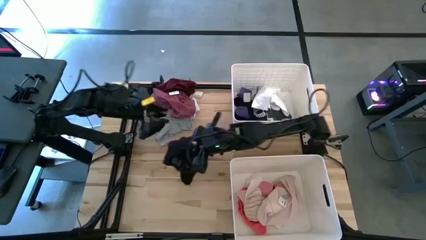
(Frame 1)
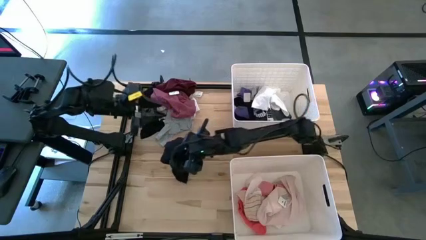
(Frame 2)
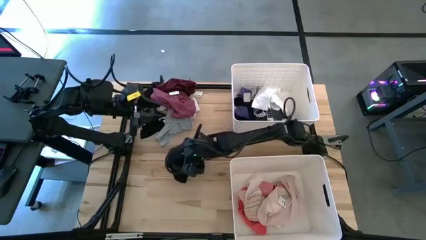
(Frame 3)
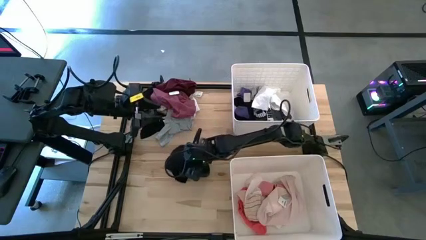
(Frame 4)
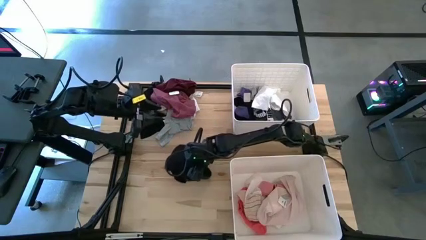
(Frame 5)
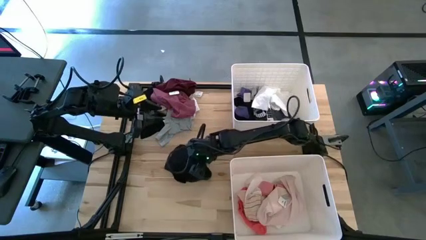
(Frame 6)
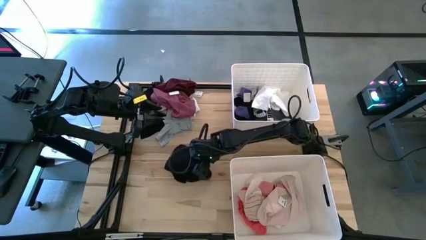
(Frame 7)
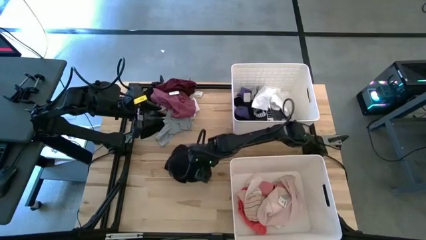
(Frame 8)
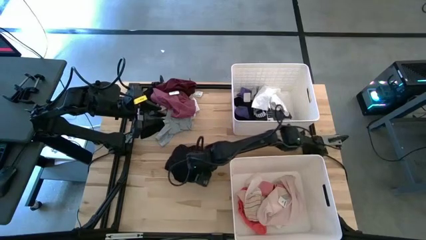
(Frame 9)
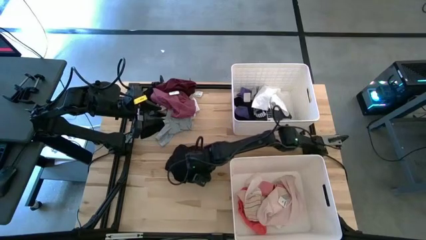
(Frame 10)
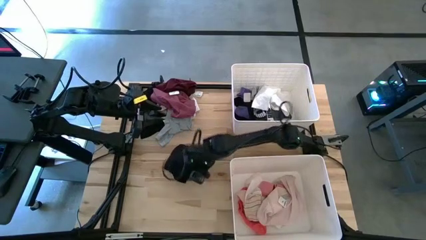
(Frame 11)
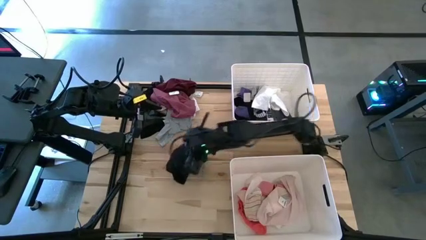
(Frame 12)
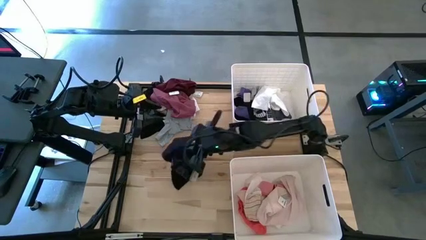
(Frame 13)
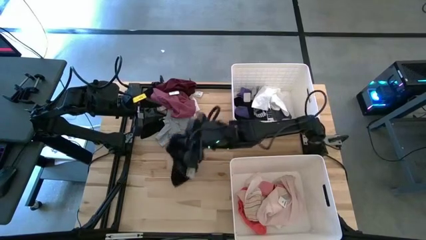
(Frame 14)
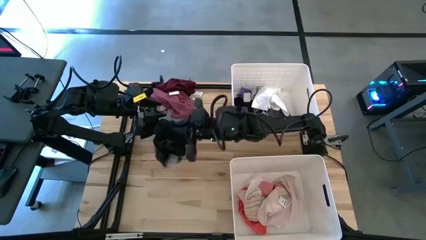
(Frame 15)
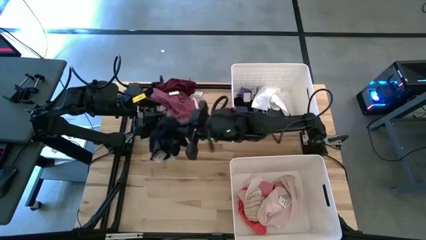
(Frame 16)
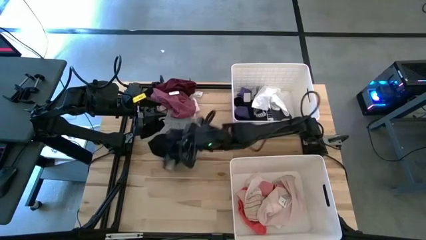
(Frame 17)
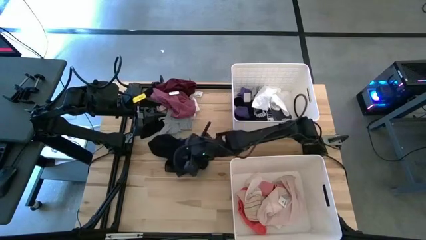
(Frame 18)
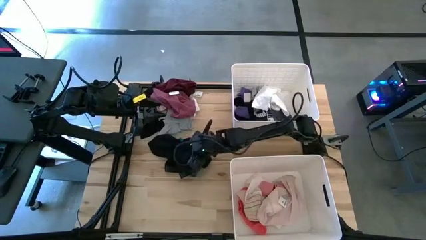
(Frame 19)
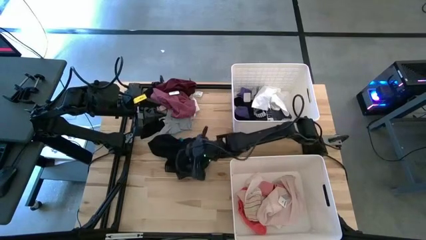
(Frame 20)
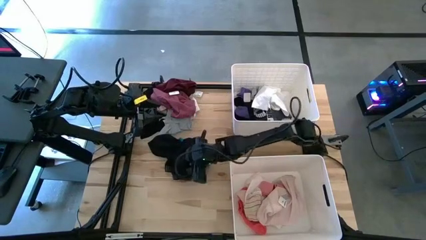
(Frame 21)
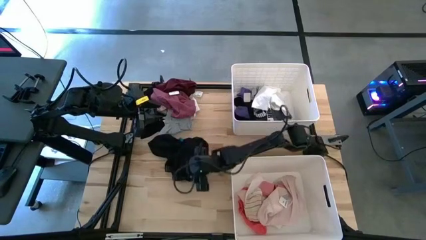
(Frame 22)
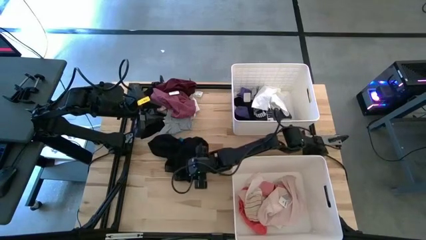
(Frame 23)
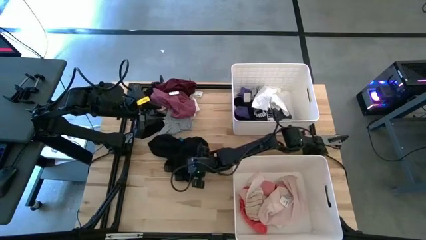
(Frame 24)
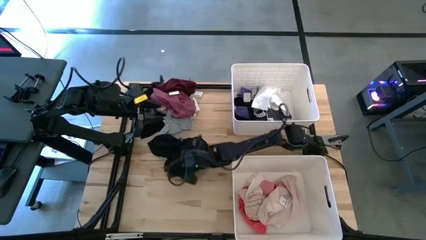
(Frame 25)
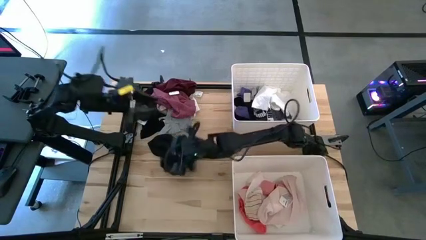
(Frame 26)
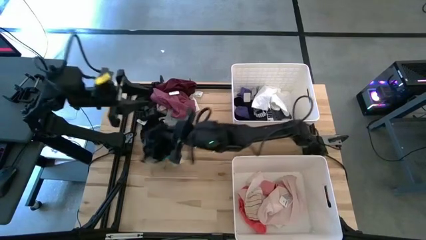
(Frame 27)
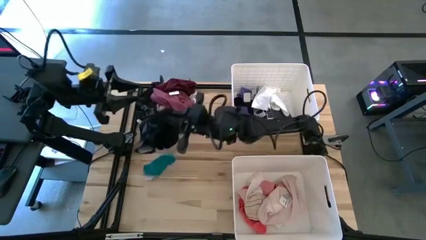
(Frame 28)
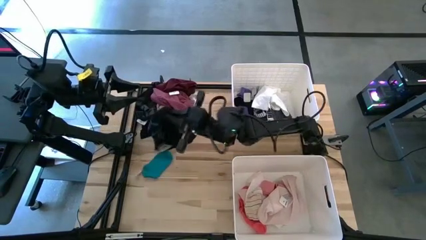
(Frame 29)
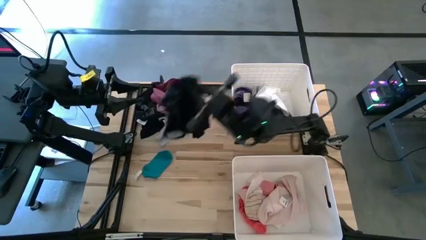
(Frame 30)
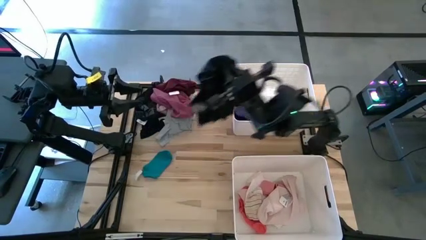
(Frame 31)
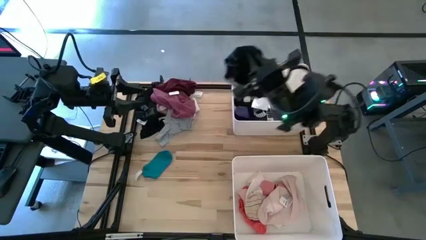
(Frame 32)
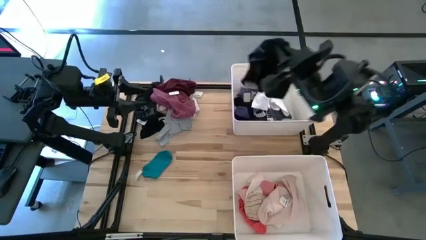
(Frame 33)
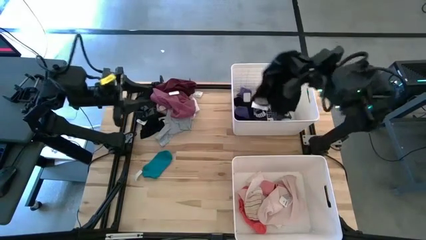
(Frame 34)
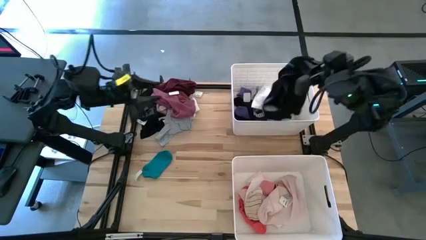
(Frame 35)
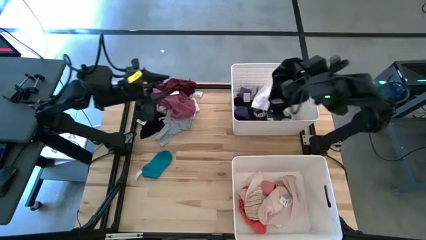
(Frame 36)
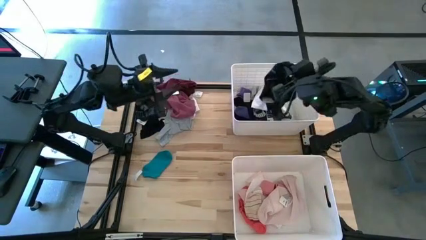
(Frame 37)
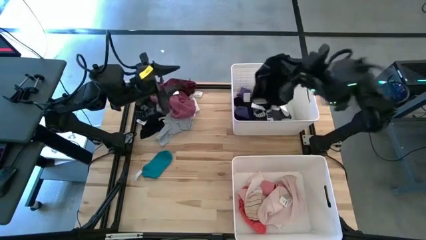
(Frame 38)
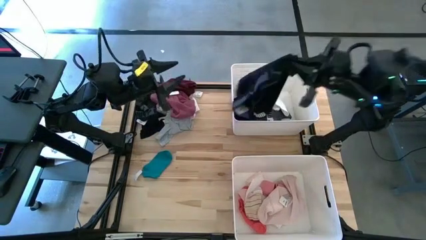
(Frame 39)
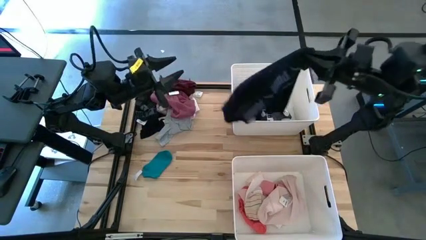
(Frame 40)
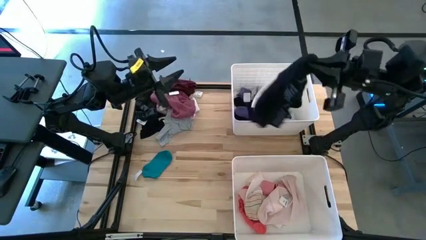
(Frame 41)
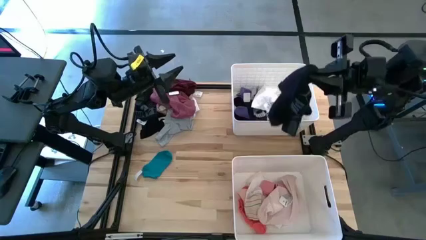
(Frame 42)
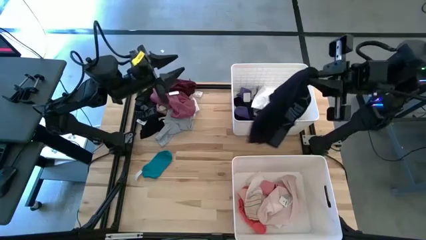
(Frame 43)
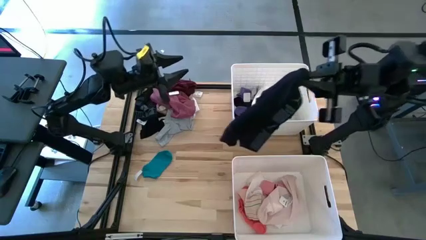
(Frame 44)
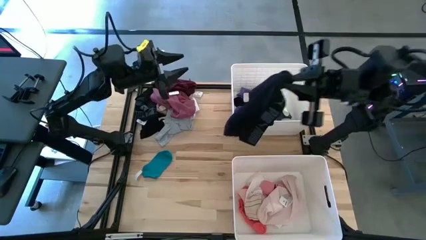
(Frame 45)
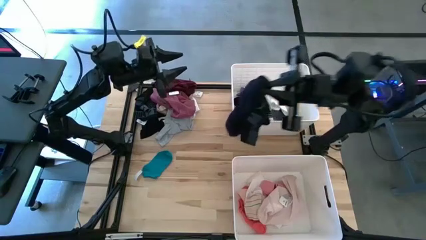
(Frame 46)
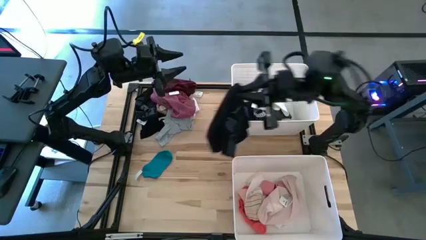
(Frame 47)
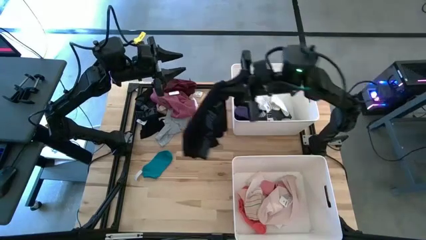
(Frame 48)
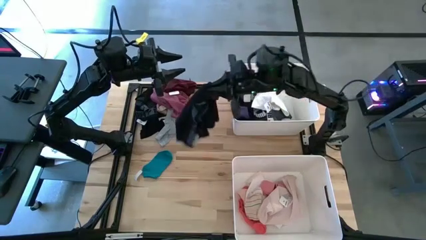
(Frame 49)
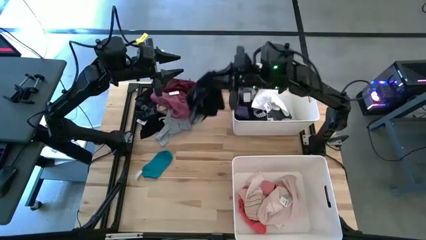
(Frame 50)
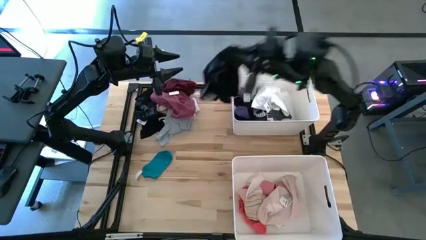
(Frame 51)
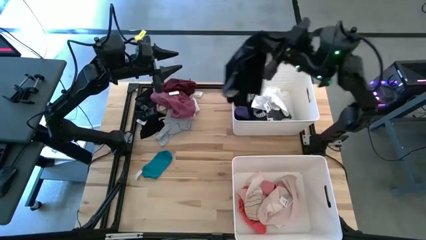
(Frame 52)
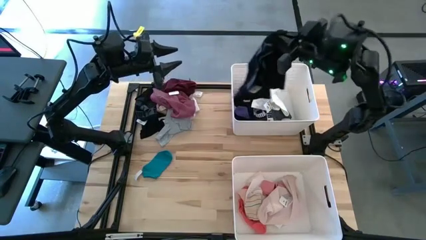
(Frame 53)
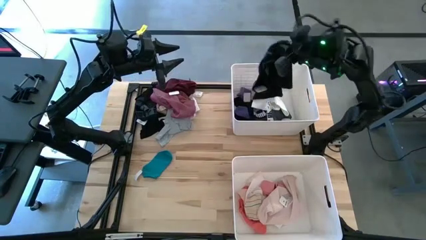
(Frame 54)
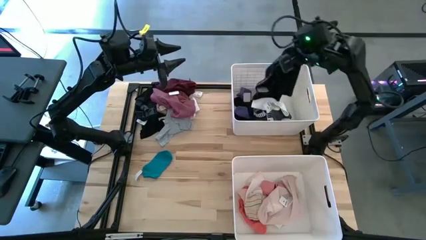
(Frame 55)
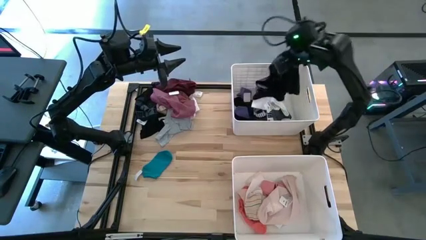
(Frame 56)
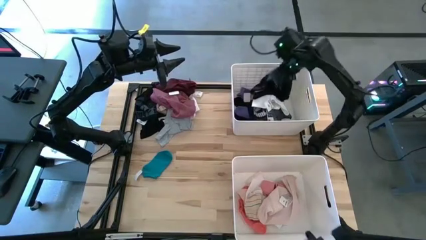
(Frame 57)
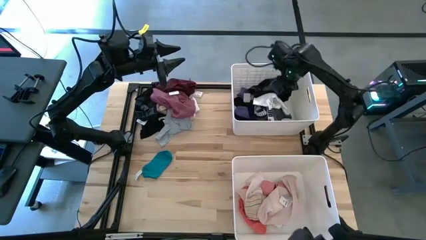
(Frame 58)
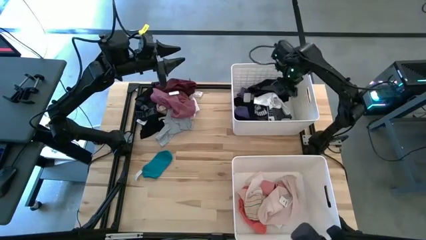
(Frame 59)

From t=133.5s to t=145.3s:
Task: Sort clothes
Put the black shorts into the top bin

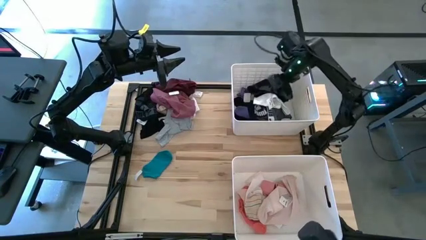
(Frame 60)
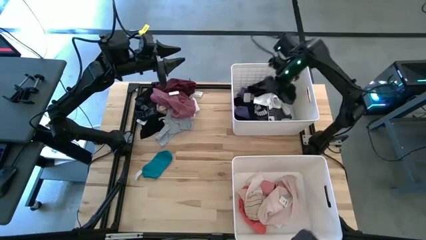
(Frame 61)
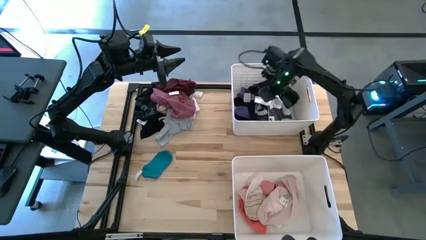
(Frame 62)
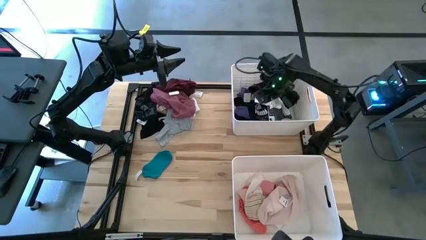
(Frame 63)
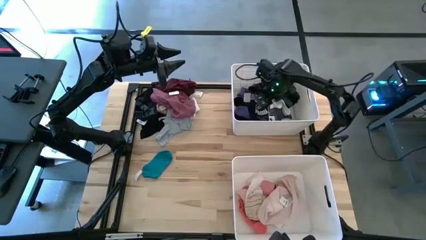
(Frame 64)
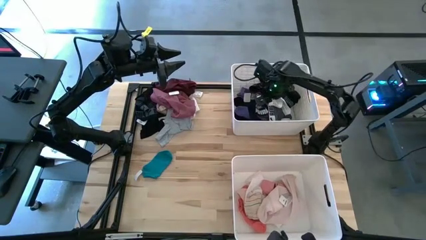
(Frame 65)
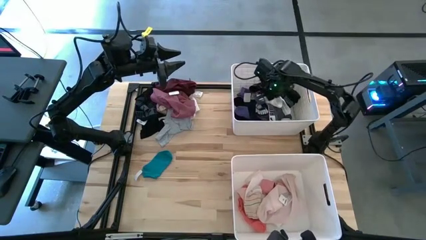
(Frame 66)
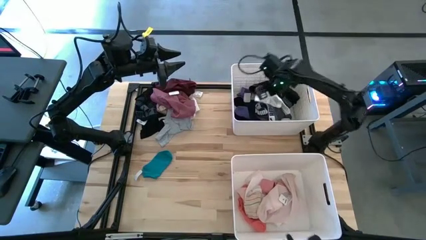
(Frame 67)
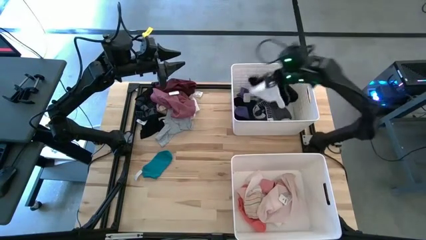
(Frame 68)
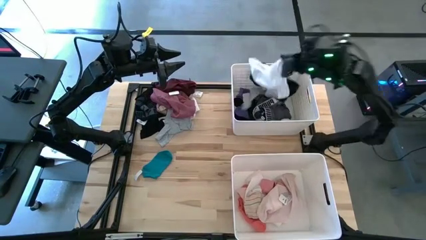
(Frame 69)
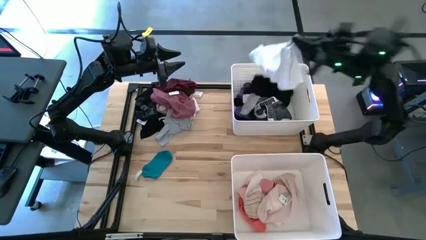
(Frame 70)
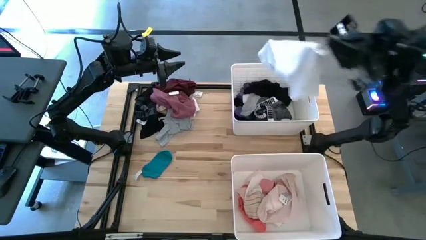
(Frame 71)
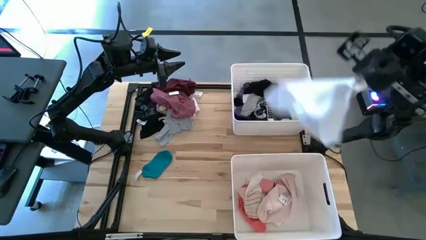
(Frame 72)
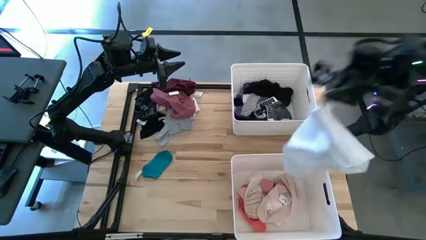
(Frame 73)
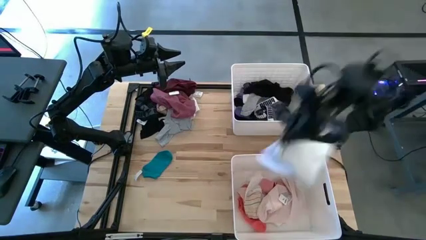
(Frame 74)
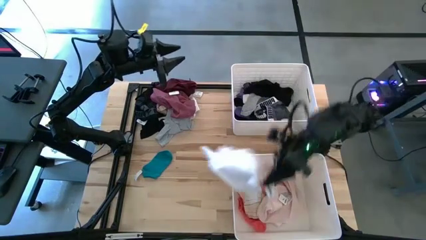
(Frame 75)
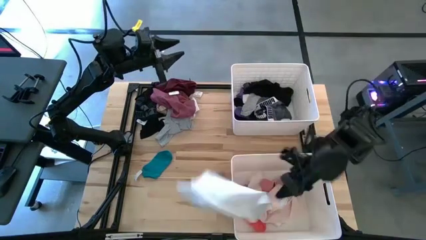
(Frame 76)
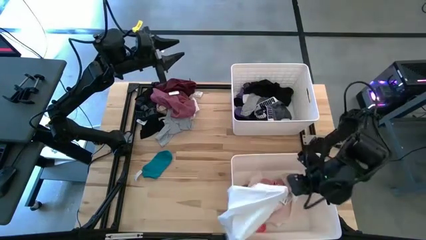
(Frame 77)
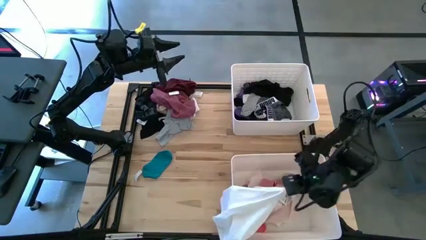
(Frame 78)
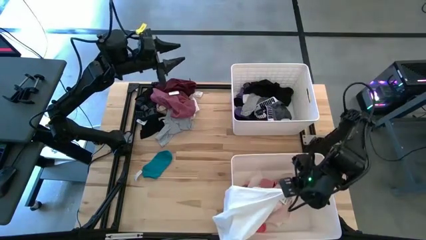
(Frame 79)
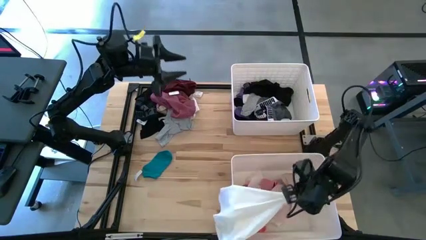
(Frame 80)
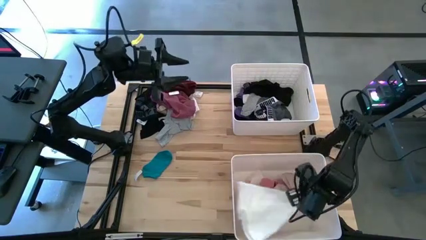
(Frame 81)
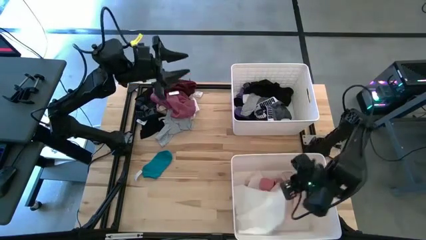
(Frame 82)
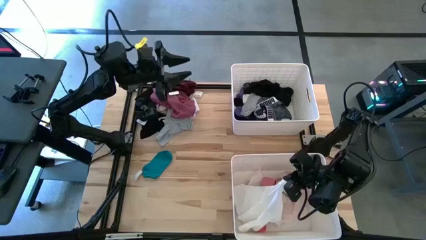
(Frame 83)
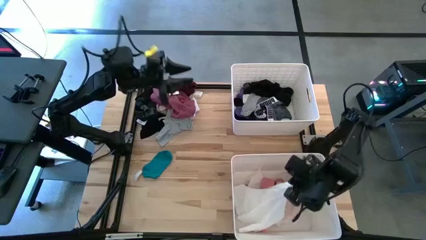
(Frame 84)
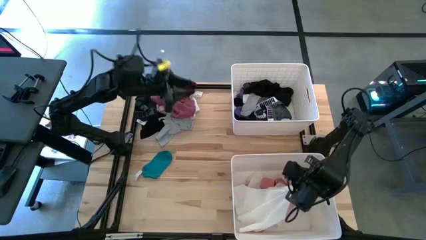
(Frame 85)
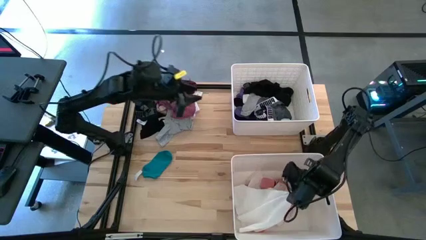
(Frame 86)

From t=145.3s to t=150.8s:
Put the white towel into the bottom bin
